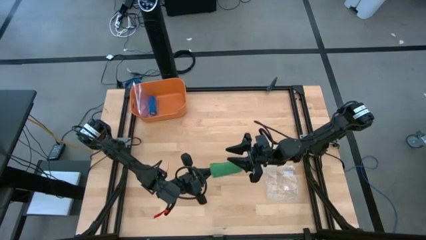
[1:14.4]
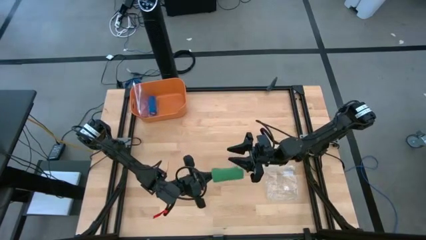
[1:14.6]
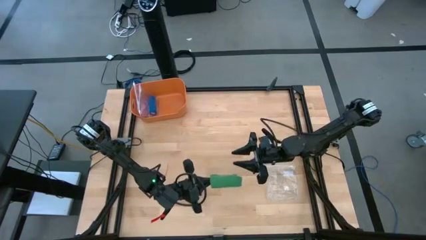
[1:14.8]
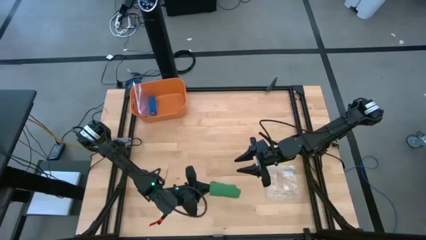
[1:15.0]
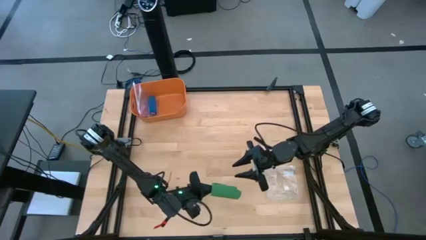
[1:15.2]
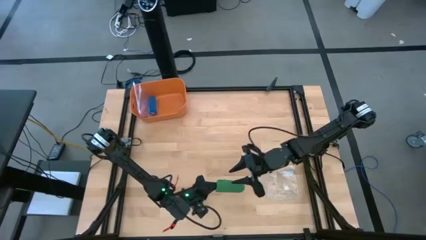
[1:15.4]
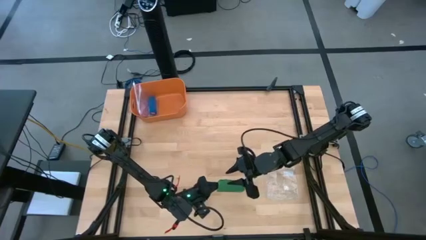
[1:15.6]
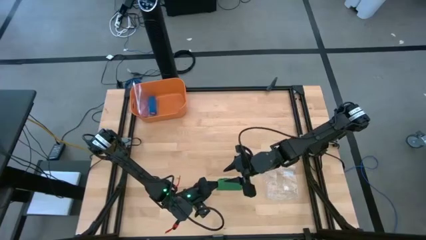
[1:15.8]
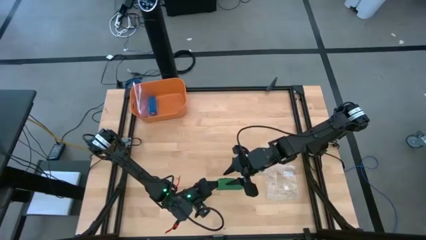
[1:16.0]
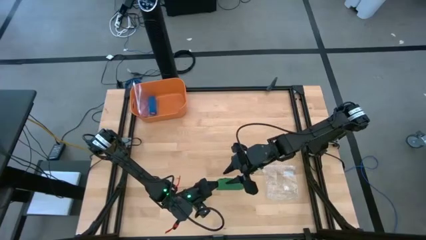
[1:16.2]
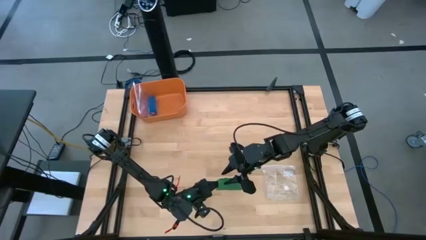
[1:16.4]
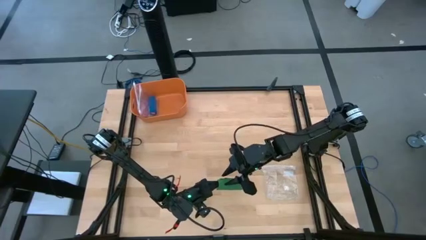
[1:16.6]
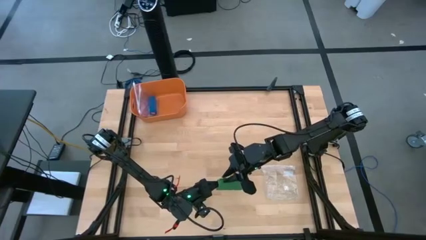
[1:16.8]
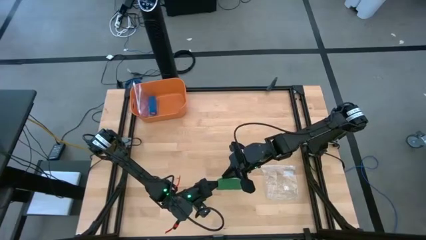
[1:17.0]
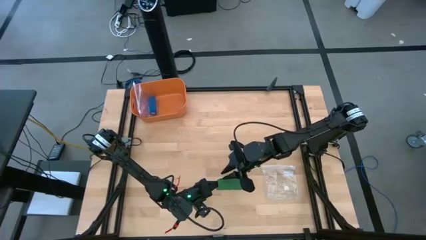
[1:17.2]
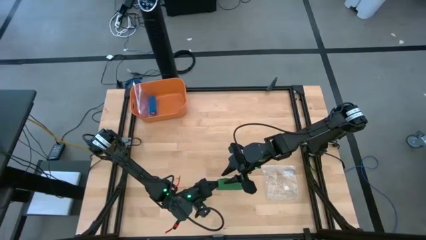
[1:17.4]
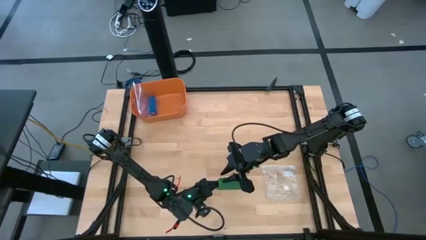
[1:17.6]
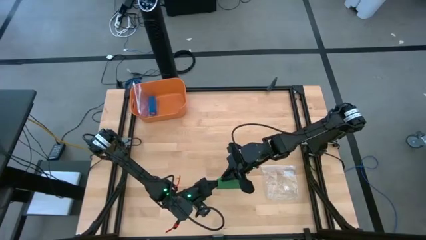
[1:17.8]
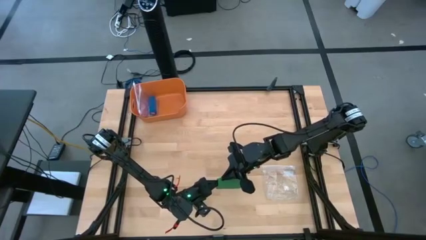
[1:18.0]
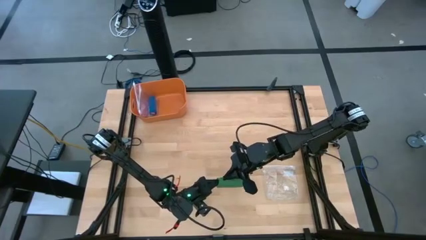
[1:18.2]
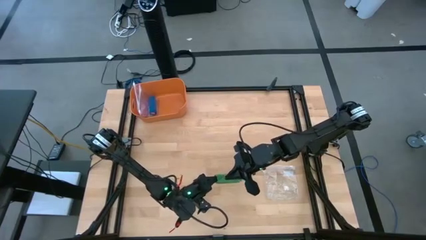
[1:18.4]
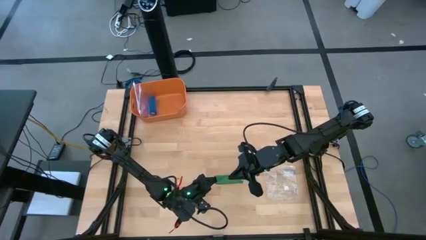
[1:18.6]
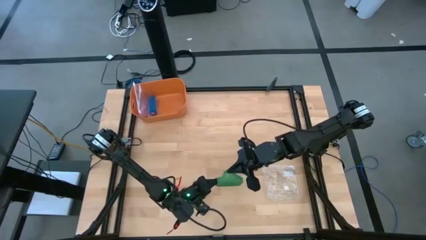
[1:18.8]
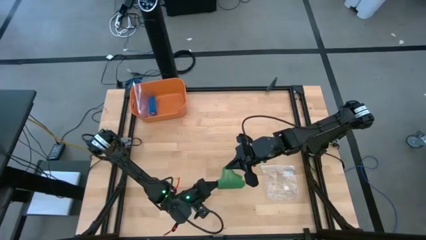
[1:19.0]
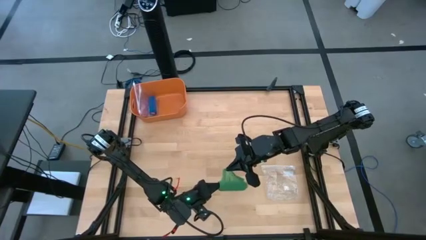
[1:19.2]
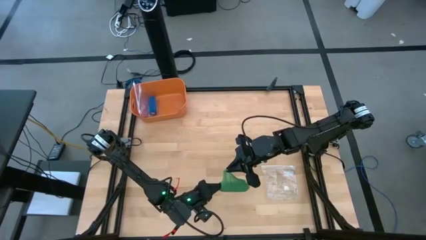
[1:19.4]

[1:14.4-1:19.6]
Task: Roll bandage
Roll the green bandage

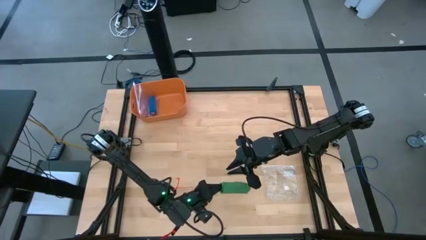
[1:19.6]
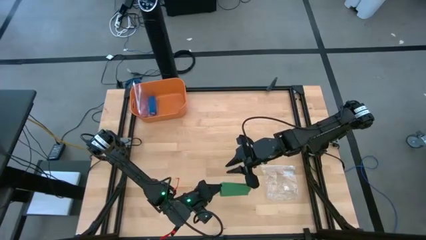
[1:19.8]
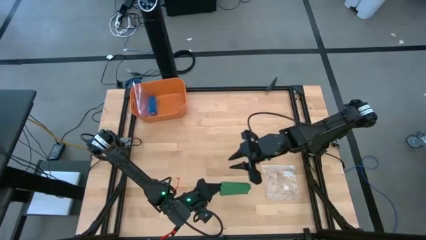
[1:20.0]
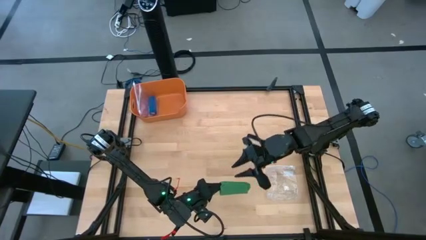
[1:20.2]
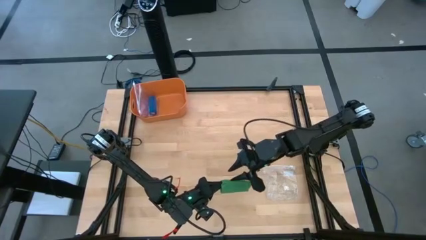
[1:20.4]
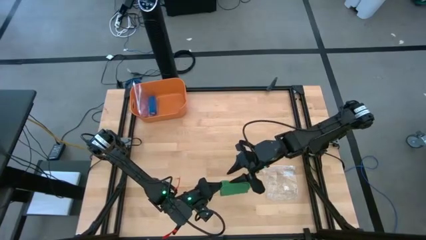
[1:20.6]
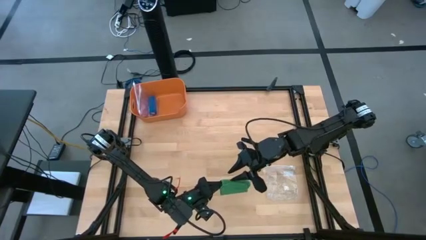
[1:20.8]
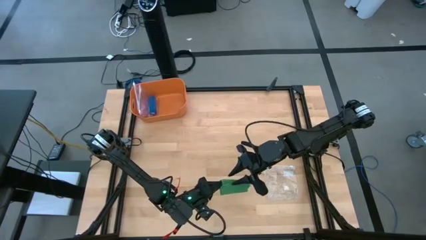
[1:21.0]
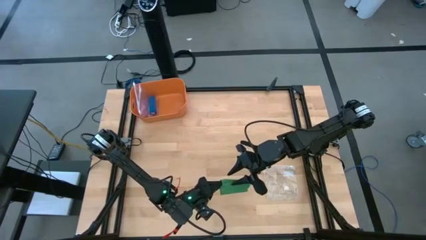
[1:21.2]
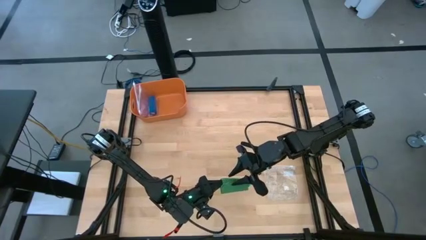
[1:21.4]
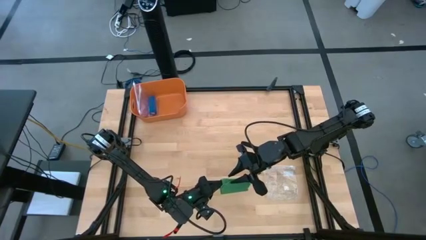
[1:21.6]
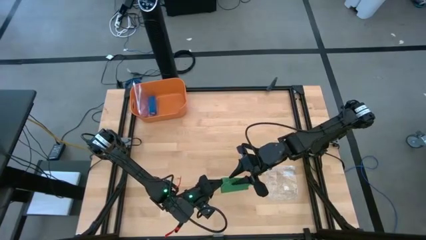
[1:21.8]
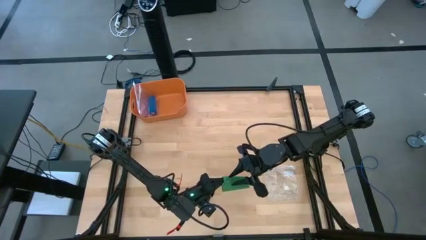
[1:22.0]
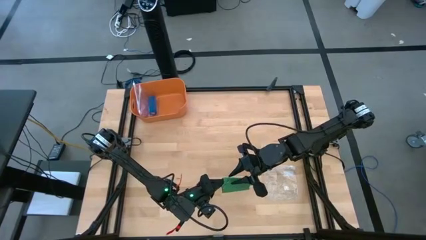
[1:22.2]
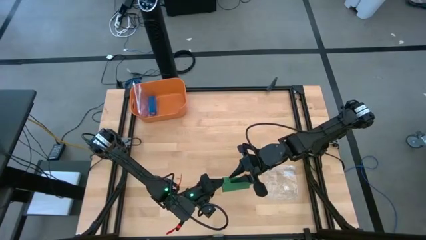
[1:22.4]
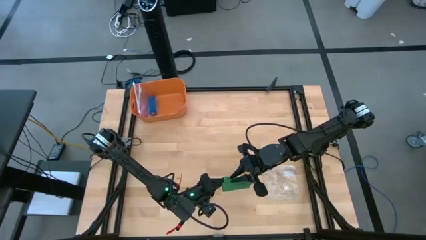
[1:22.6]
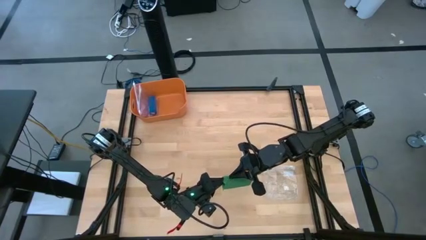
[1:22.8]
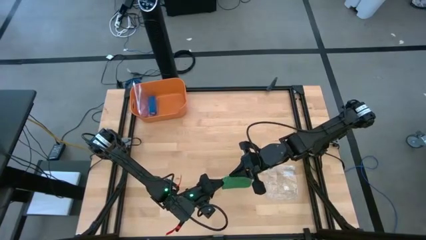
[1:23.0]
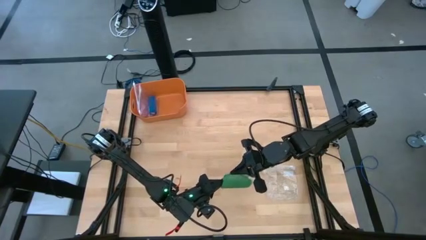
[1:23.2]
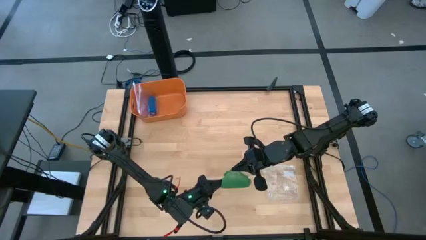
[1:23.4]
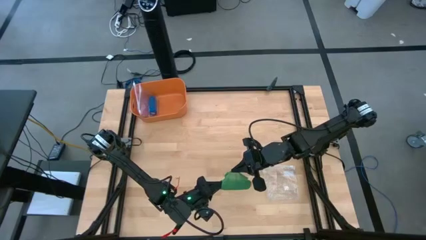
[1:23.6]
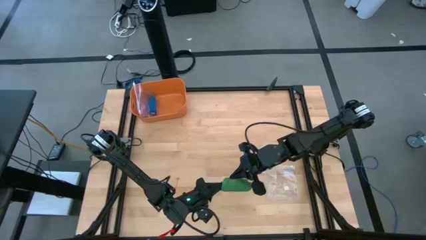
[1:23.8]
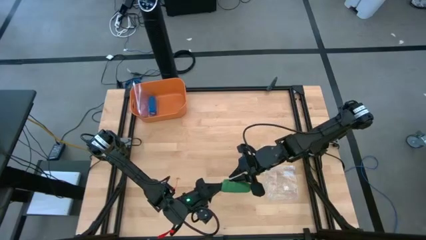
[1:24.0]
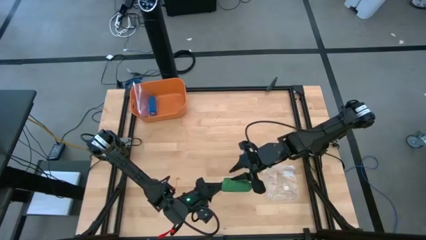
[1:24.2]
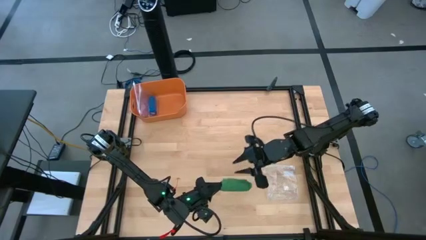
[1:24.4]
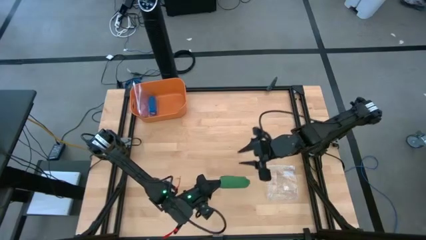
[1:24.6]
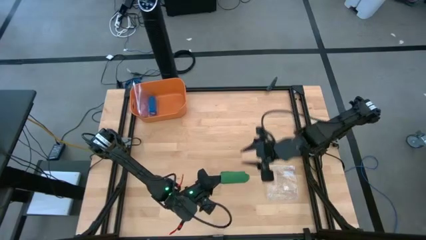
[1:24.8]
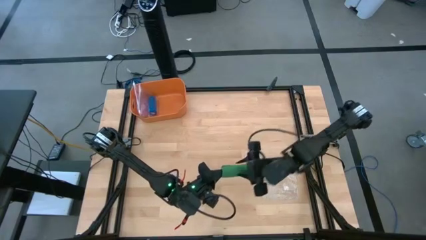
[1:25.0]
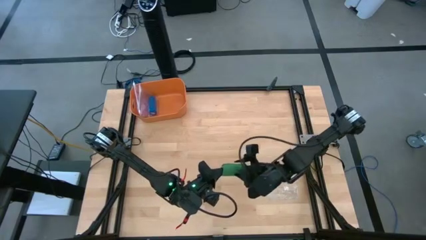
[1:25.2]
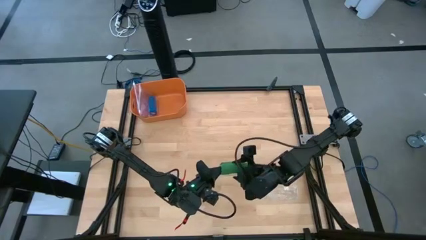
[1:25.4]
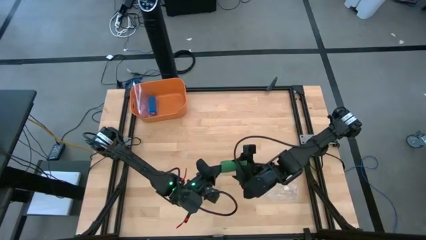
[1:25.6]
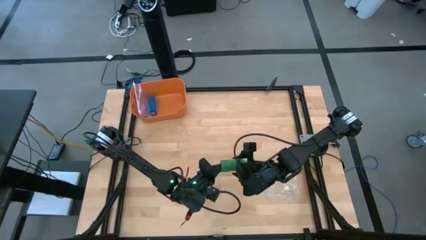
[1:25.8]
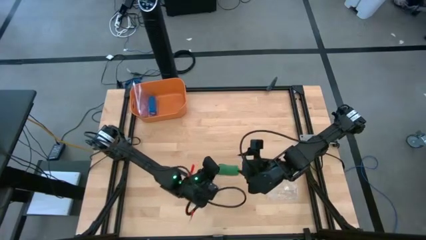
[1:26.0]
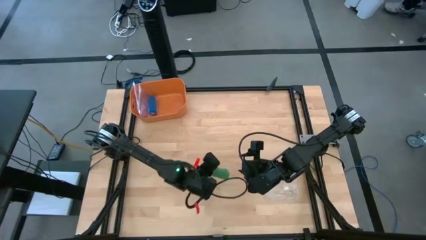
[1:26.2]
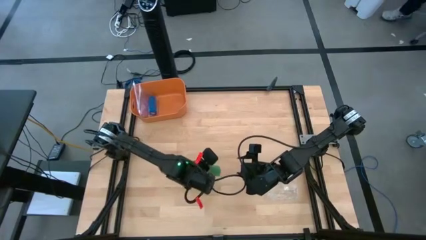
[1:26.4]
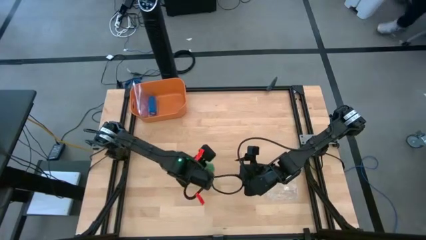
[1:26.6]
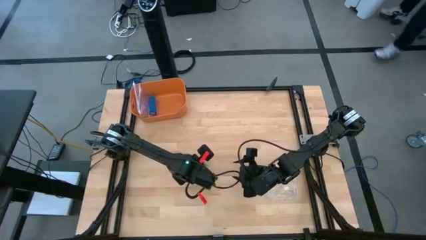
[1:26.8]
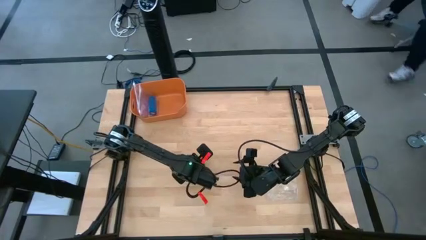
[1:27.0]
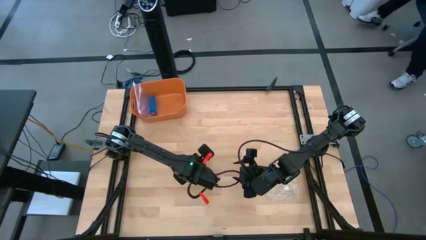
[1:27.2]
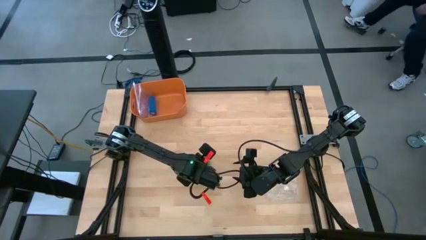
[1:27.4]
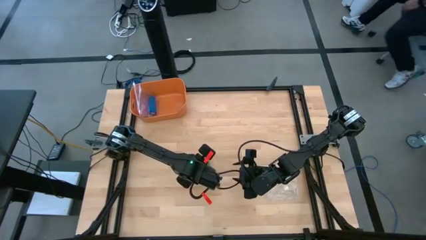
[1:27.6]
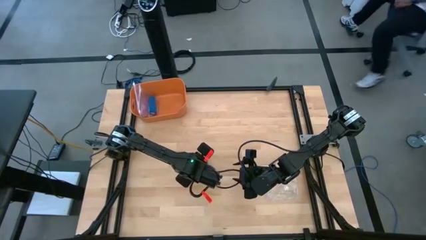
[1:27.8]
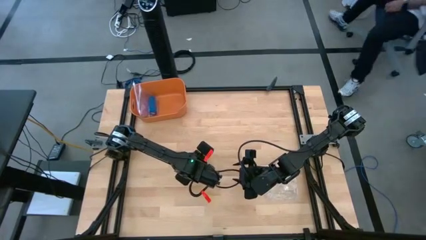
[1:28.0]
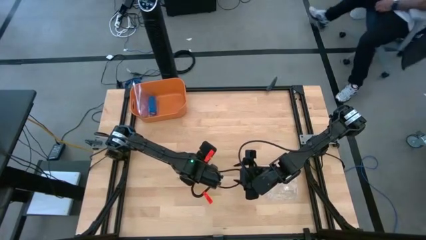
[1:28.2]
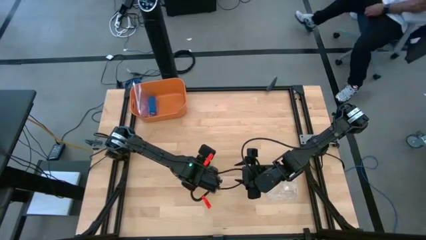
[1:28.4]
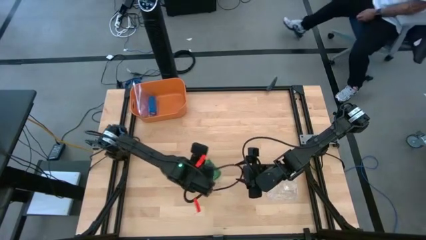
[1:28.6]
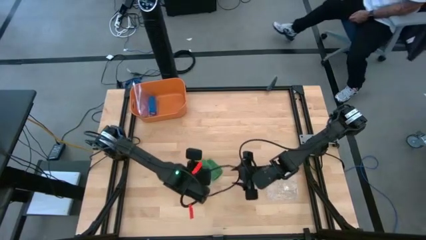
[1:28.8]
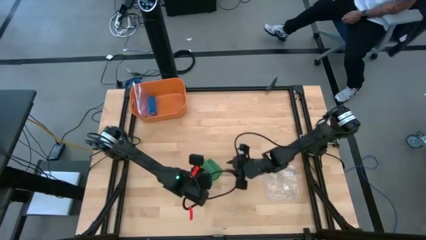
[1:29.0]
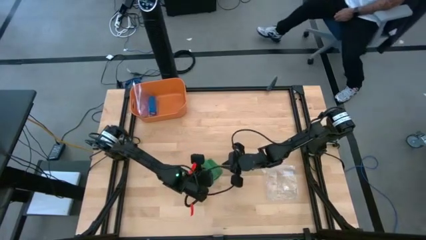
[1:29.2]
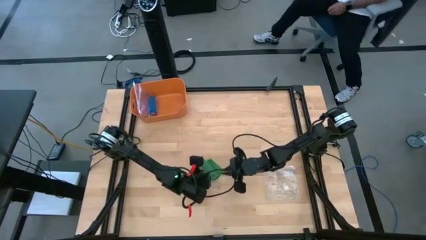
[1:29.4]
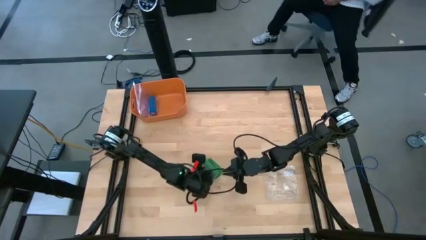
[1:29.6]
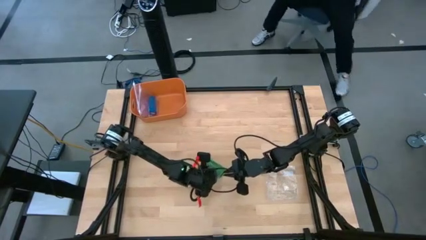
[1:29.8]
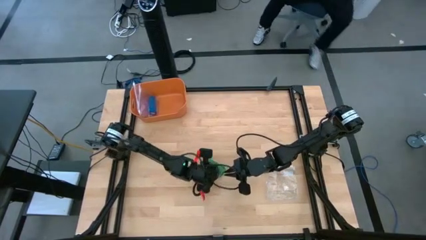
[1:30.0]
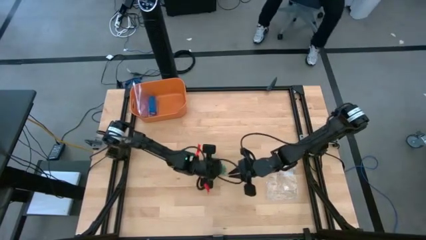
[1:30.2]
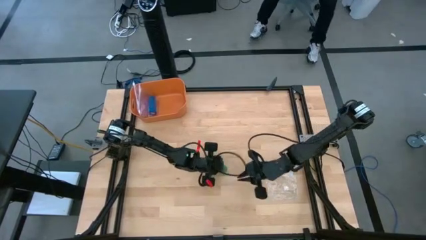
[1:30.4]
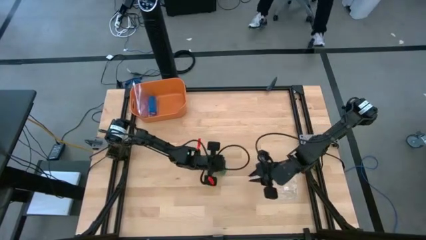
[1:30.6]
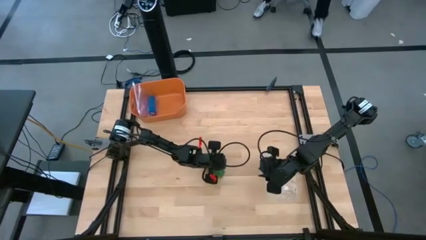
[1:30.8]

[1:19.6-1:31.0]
Roll the green bandage
